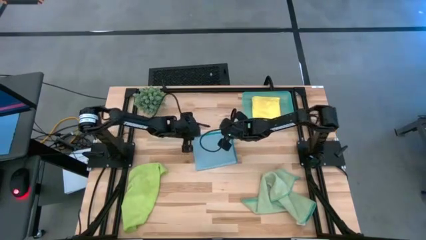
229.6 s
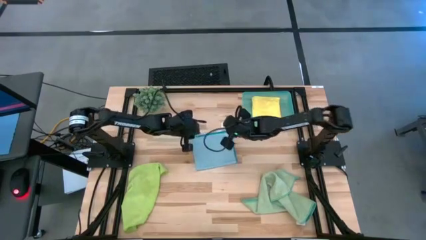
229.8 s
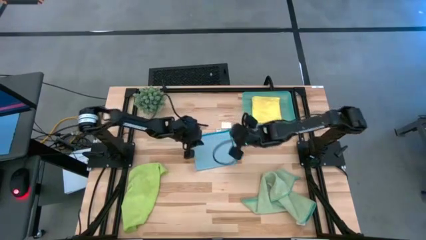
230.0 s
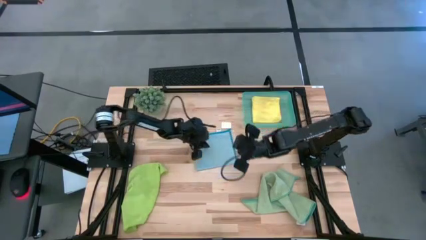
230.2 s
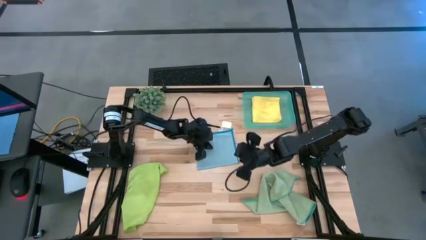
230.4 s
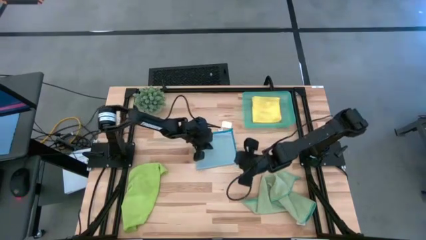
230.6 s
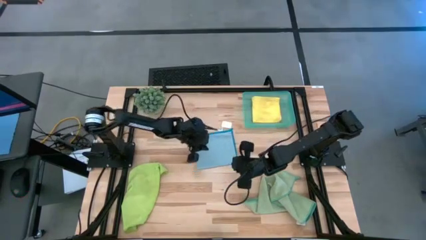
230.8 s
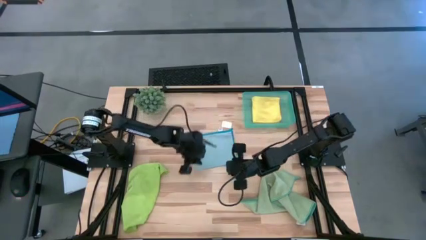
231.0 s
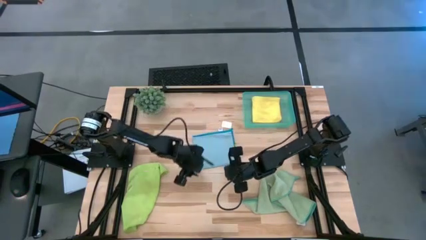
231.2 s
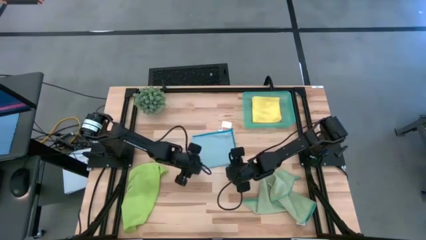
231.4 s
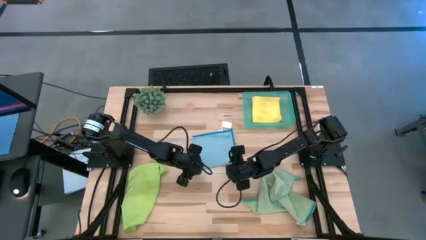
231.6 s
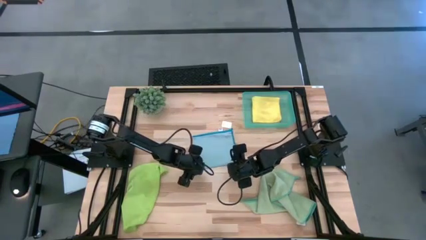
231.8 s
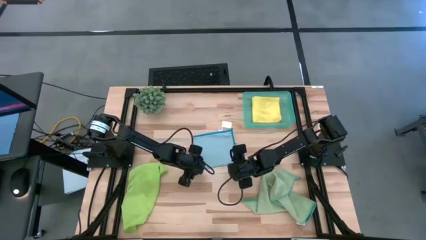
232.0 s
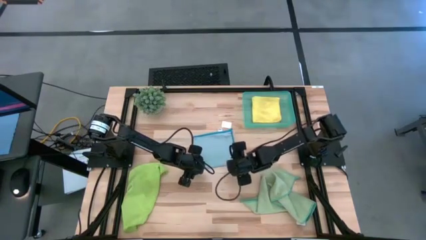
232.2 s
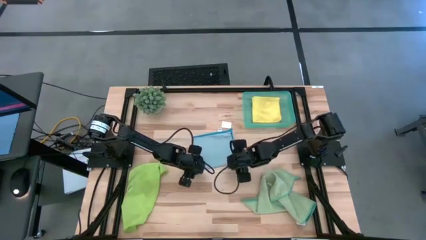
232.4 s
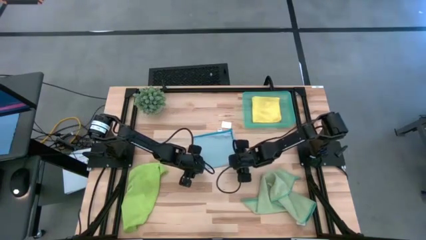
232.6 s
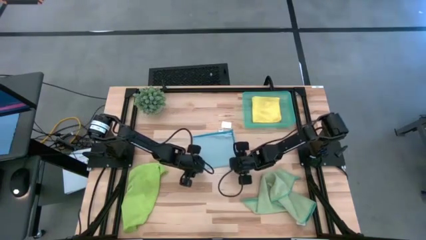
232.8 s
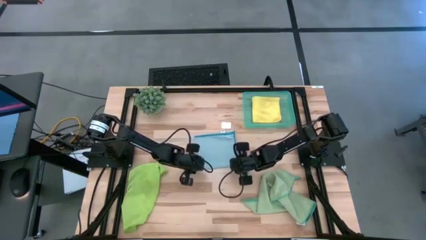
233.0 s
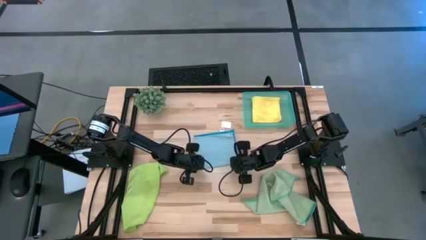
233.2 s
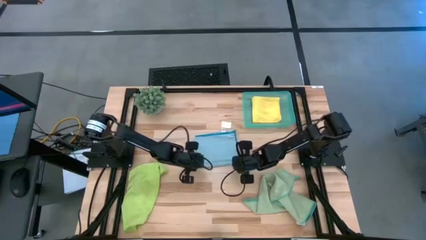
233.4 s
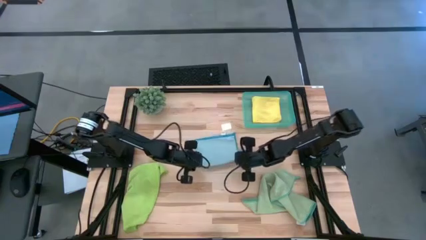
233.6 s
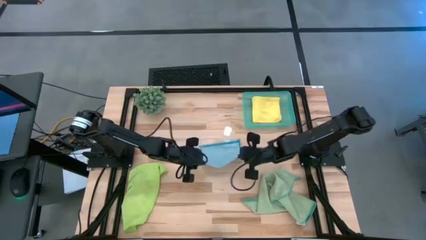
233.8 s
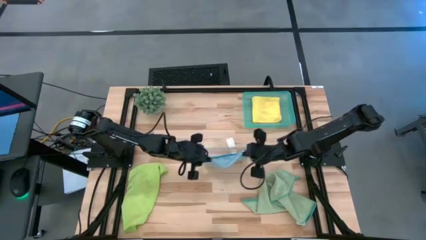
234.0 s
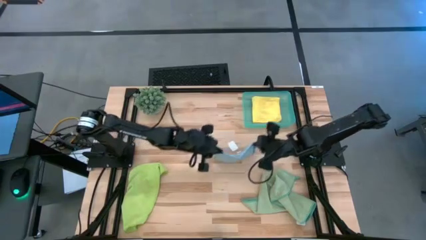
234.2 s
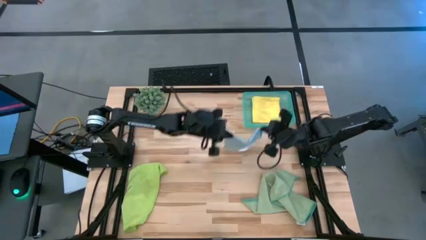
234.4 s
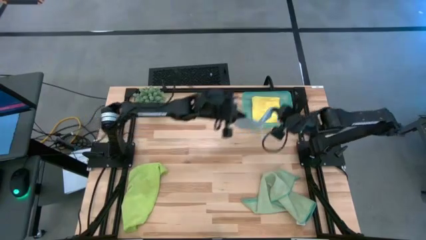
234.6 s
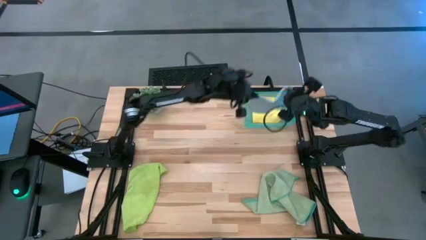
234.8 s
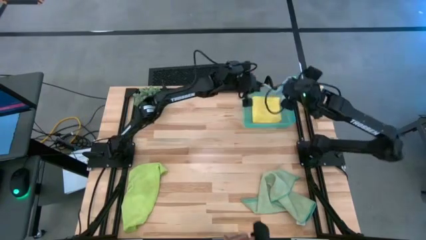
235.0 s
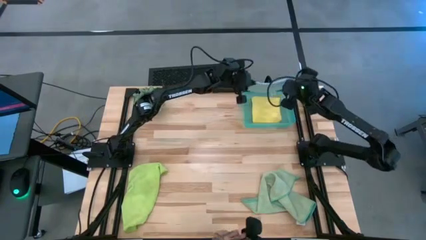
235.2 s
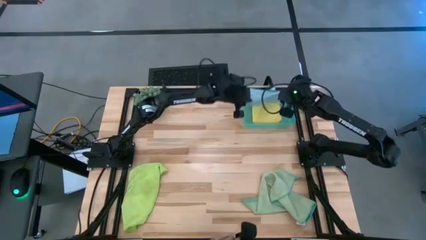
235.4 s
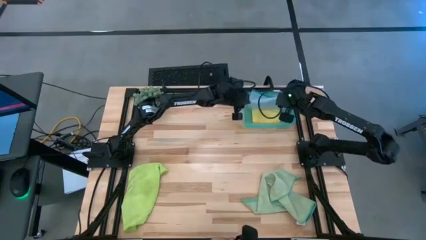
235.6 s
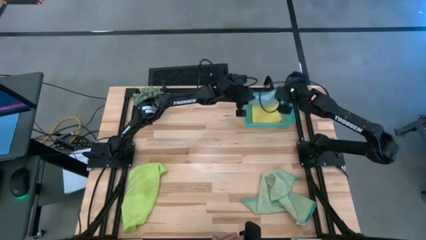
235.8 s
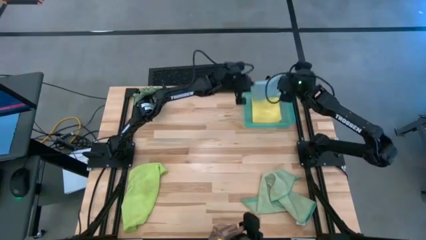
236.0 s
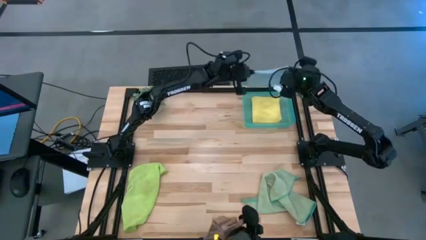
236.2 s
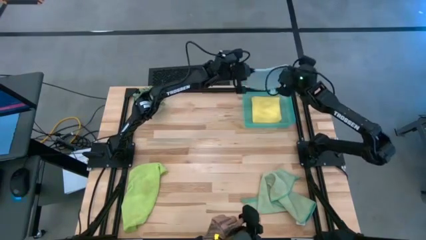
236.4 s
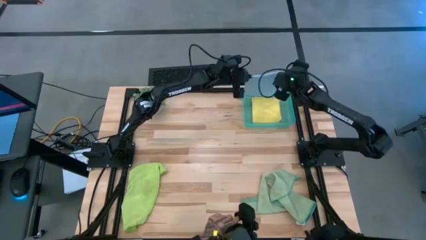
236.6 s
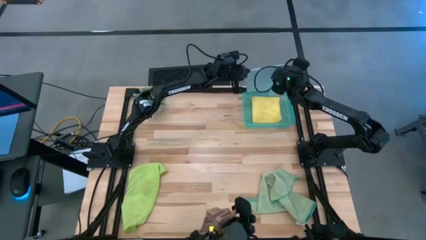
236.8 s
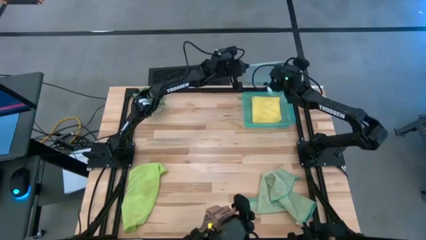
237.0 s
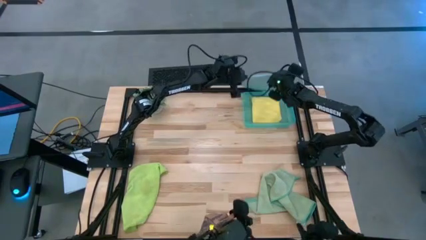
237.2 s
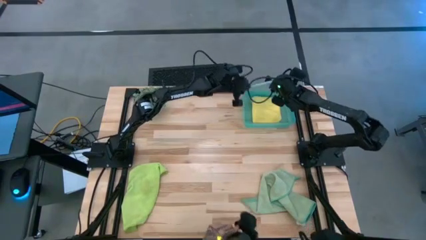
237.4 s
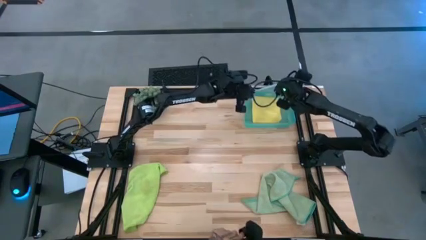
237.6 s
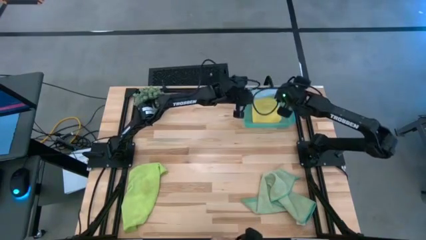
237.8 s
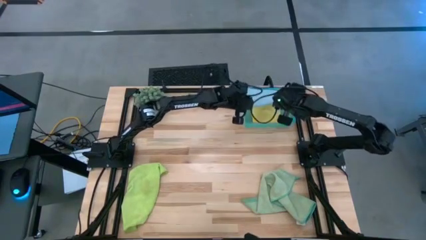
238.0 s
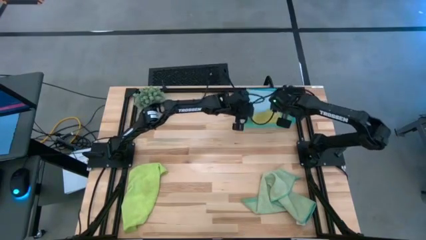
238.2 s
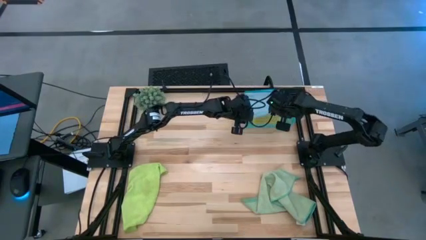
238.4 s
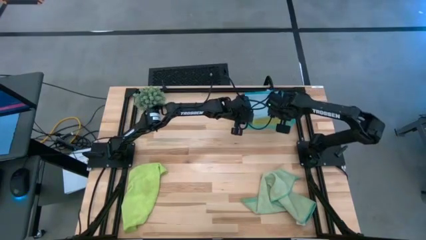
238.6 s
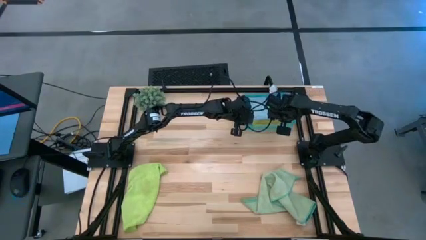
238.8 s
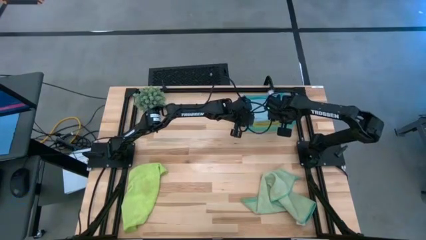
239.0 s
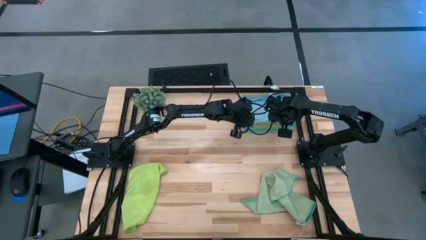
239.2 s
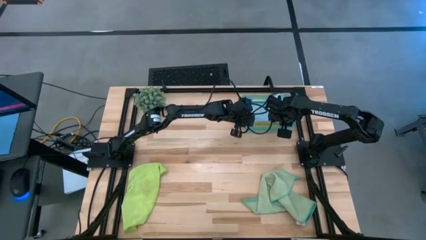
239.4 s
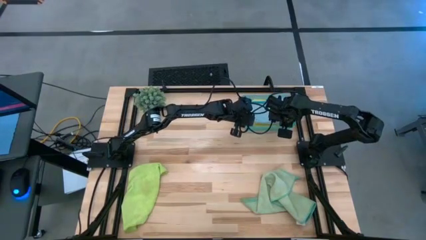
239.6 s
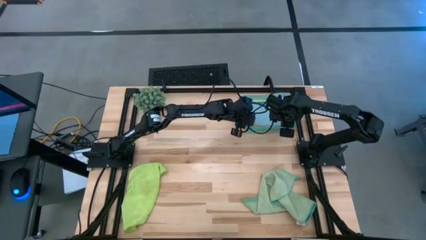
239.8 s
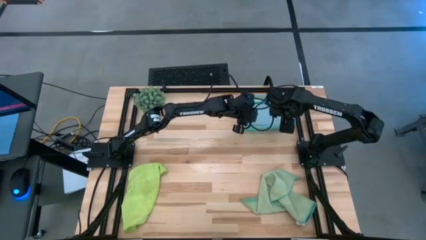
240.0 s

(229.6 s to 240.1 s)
Task: Fold microfiber towels
Stack the blue microfiber cloth on top of the yellow microfiber cloth in the blue bin

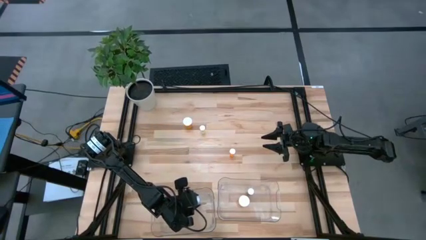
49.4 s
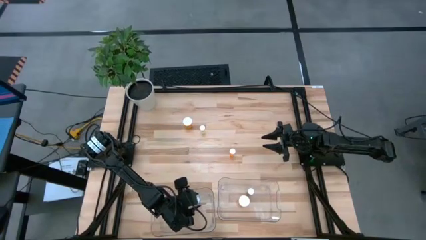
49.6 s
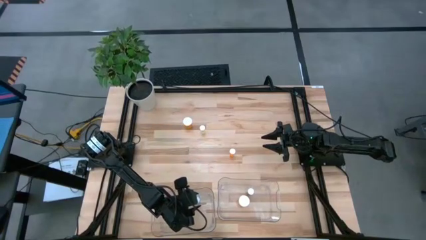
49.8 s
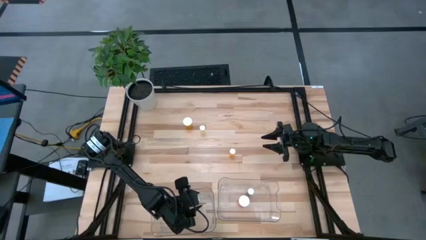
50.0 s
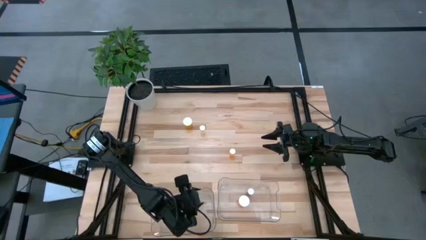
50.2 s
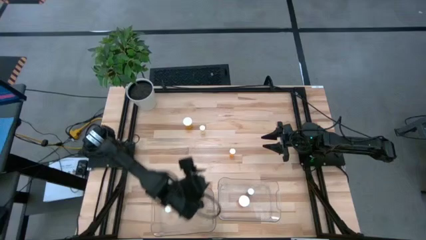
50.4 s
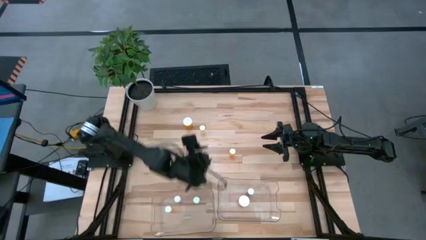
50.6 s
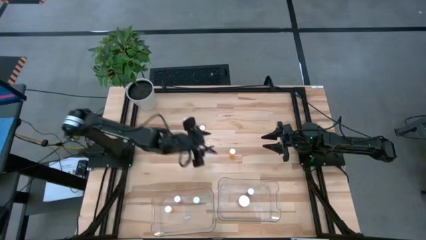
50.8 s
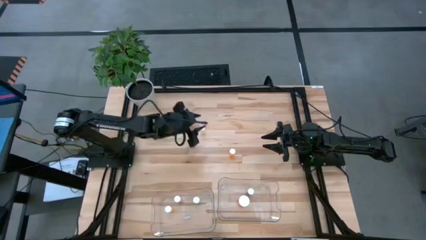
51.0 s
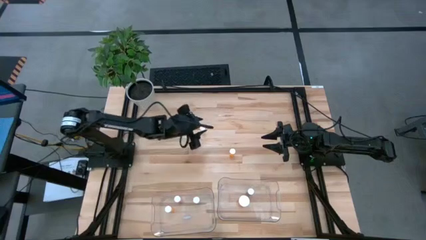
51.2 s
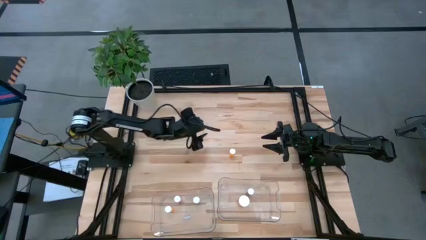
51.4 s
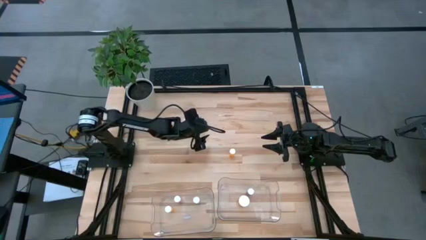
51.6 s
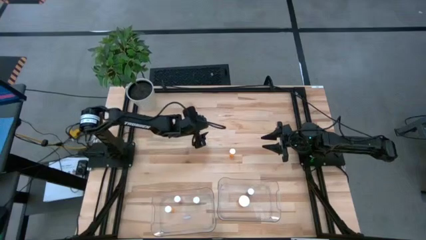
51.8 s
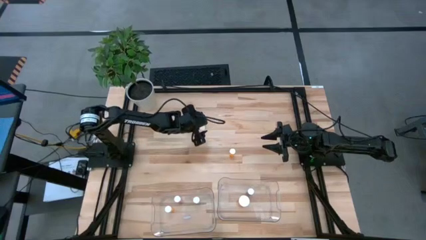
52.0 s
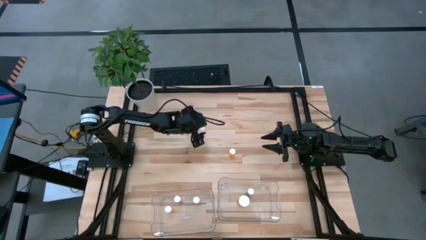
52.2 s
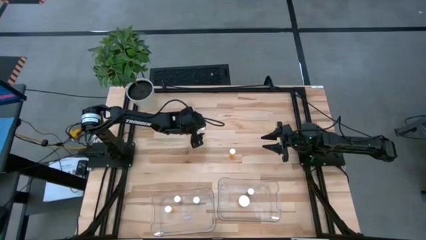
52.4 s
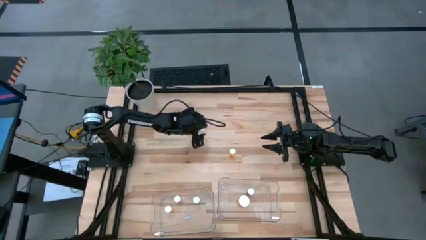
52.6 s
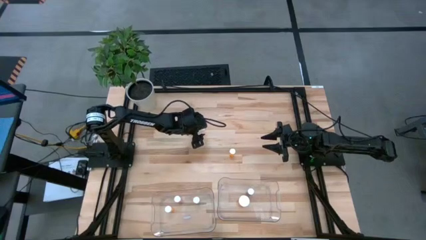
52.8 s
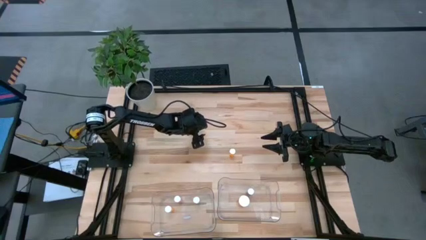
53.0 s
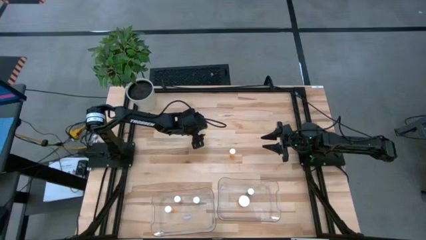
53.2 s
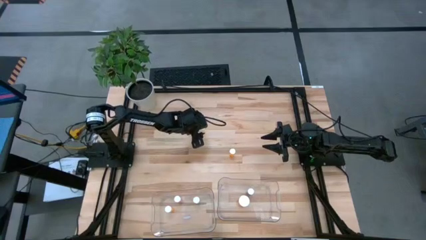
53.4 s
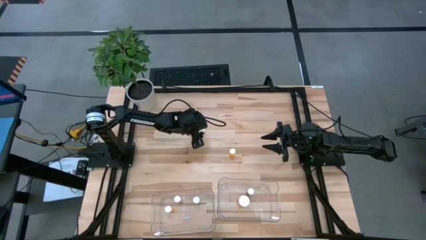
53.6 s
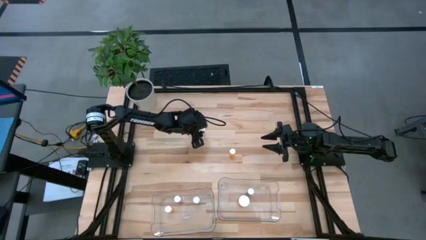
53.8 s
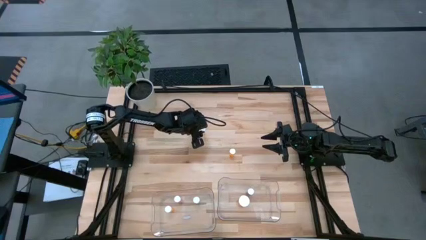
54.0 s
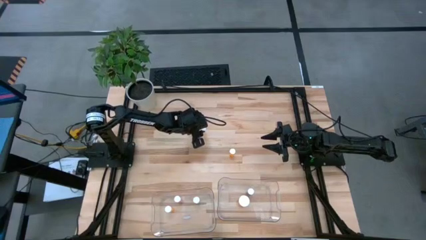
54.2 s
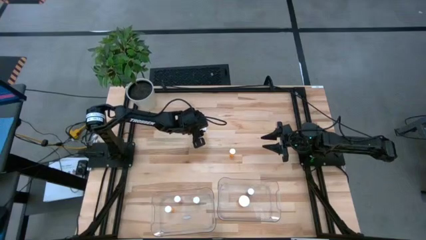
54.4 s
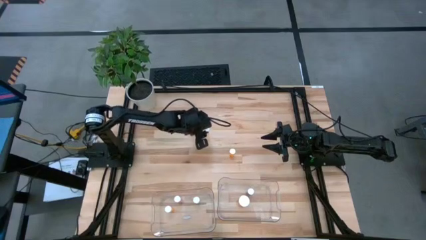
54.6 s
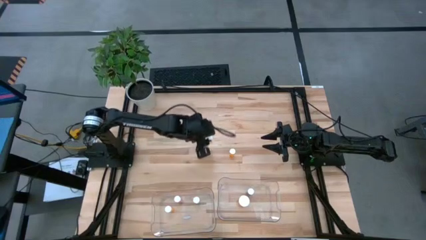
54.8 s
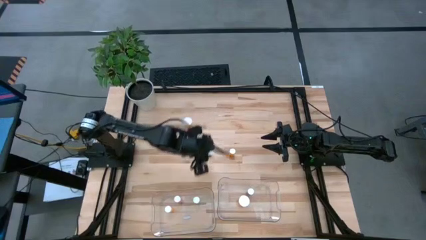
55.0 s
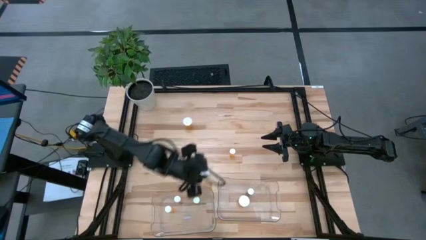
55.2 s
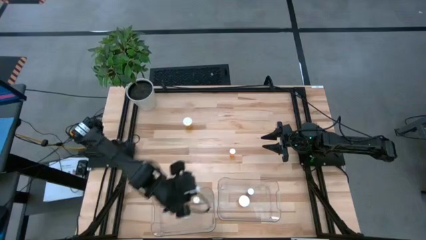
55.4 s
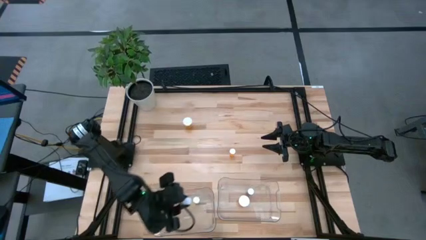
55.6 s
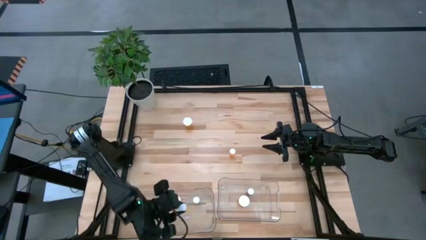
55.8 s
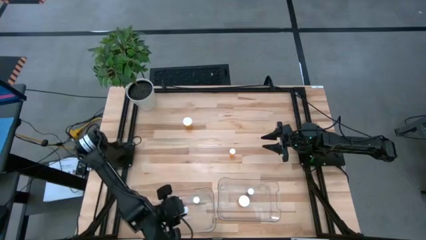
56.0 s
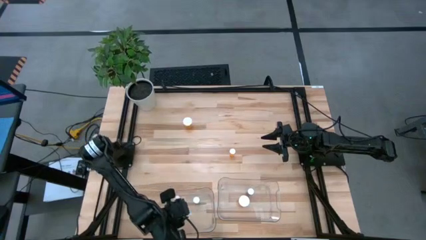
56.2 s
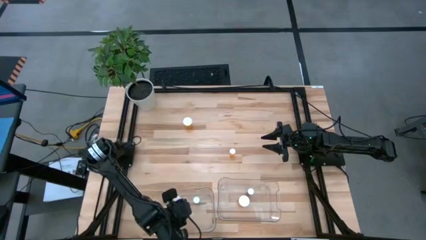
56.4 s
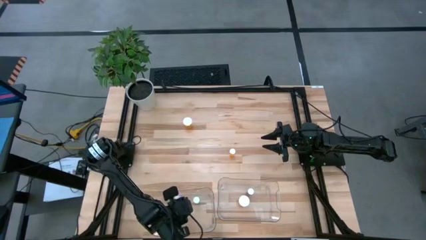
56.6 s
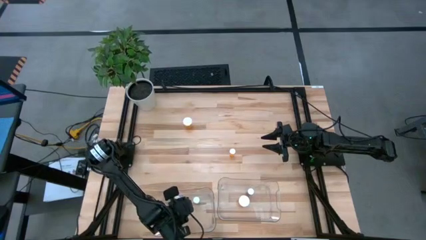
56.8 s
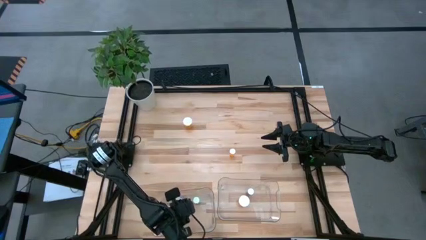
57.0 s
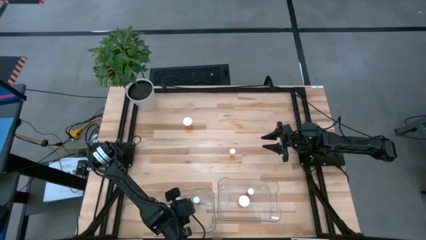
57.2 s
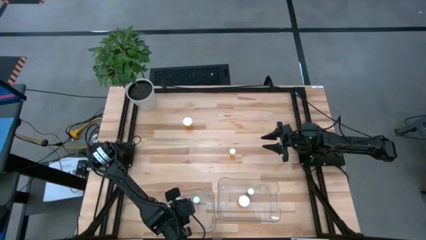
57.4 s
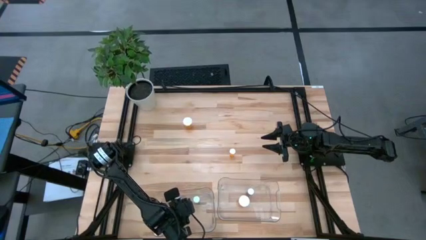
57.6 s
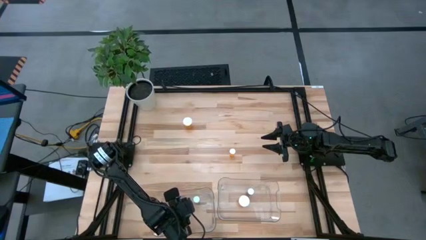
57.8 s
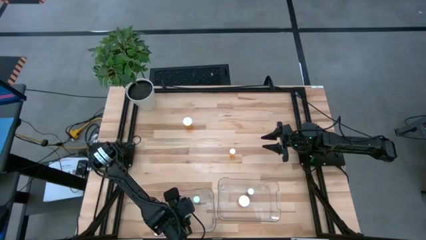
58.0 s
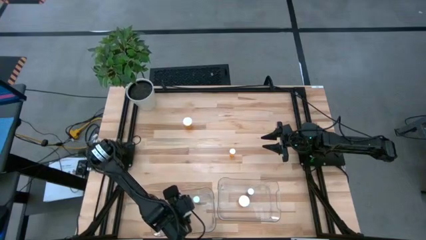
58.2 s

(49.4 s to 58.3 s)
Task: Pick and place medicine bottles into bin by pill shape (circle, oval)
Put the yellow tablet bottle into the left transparent bin
